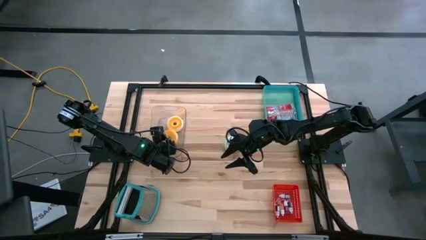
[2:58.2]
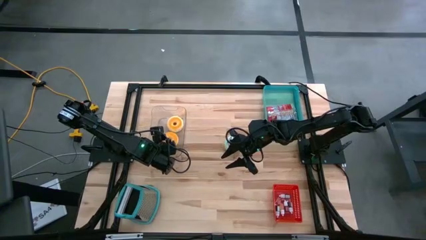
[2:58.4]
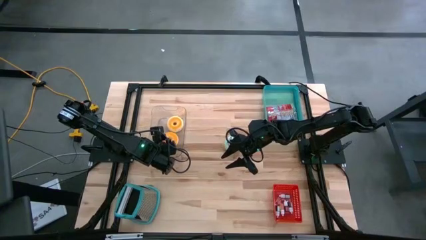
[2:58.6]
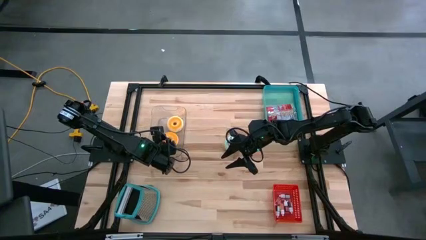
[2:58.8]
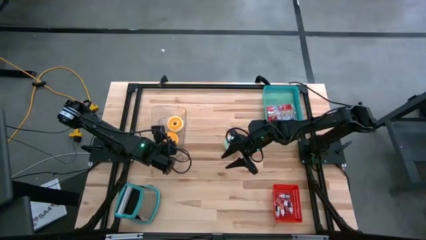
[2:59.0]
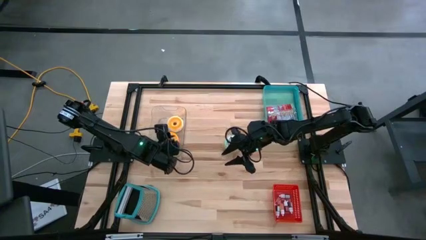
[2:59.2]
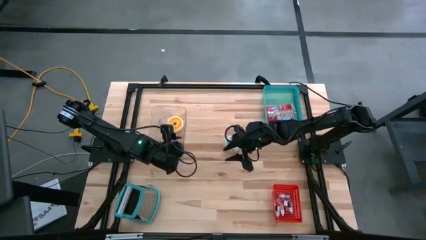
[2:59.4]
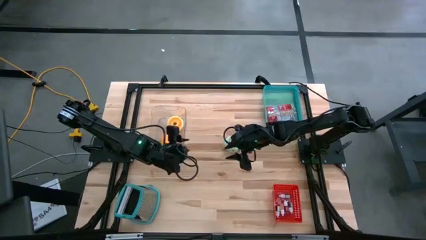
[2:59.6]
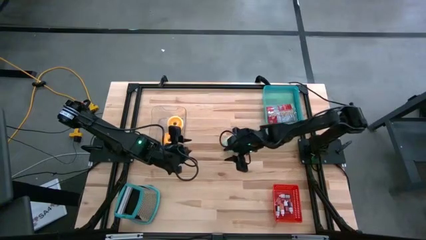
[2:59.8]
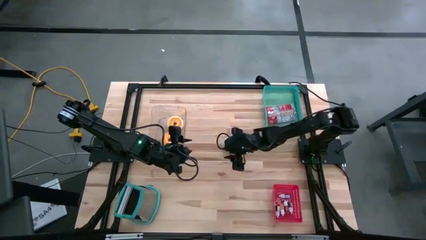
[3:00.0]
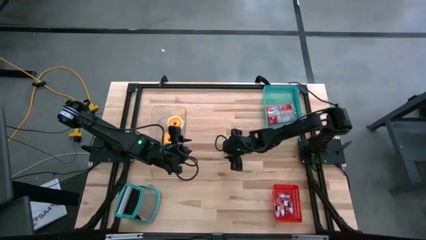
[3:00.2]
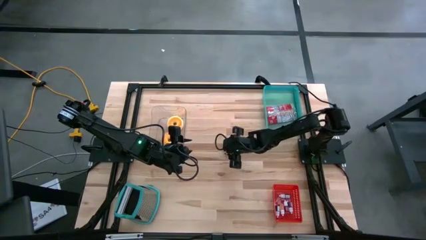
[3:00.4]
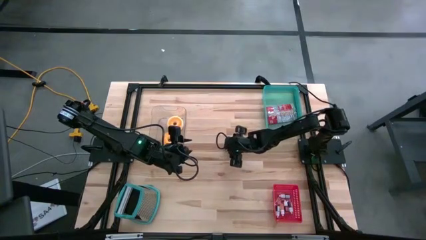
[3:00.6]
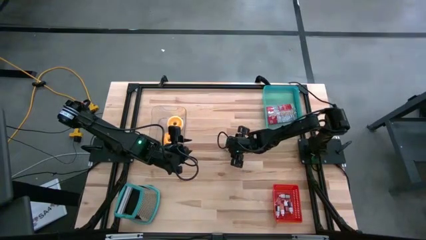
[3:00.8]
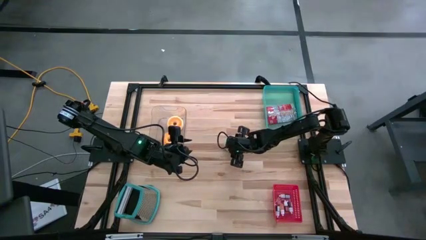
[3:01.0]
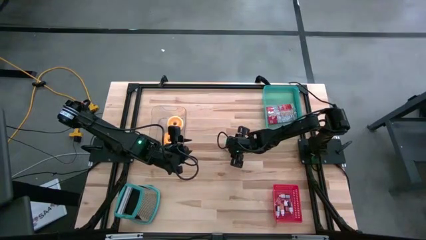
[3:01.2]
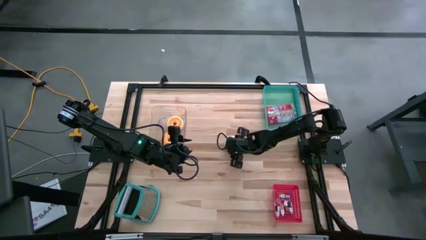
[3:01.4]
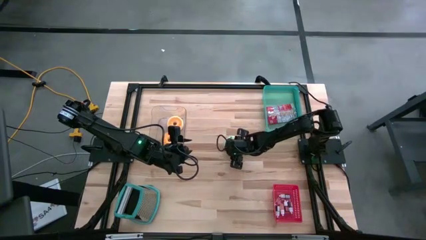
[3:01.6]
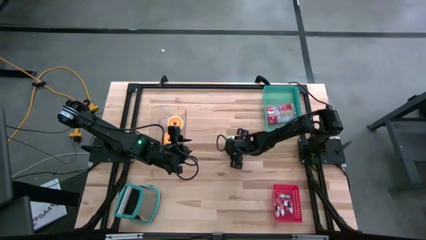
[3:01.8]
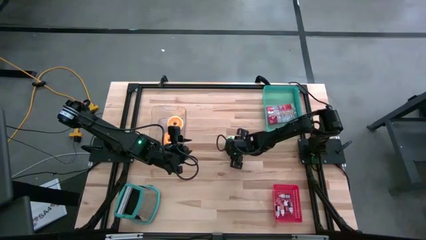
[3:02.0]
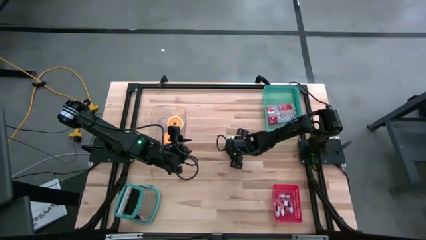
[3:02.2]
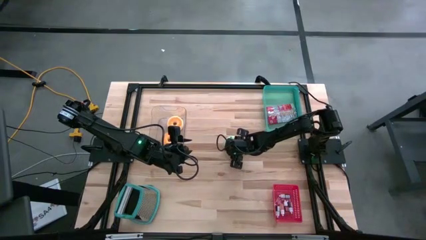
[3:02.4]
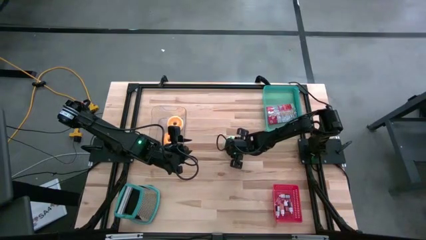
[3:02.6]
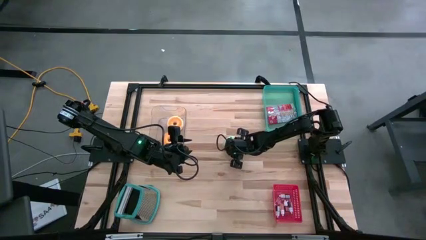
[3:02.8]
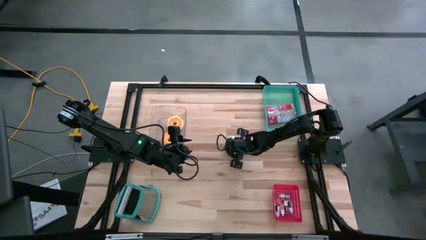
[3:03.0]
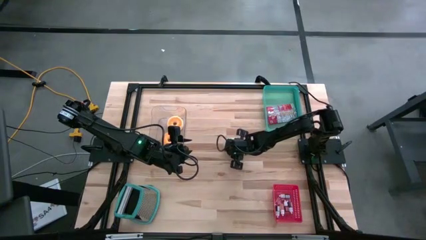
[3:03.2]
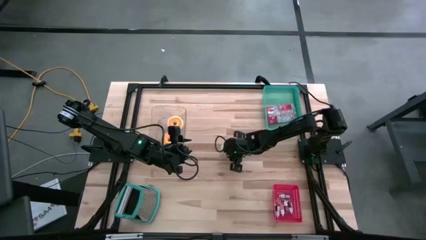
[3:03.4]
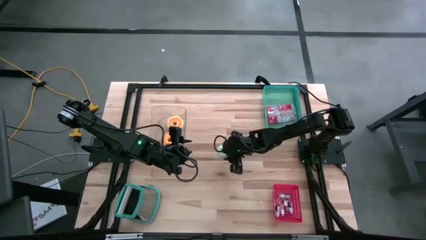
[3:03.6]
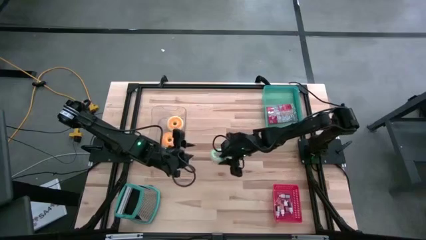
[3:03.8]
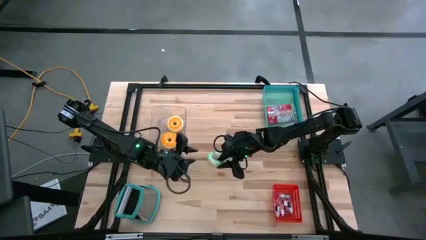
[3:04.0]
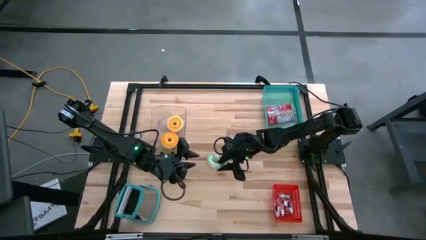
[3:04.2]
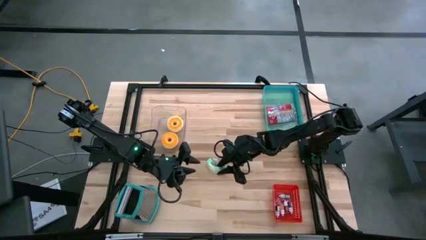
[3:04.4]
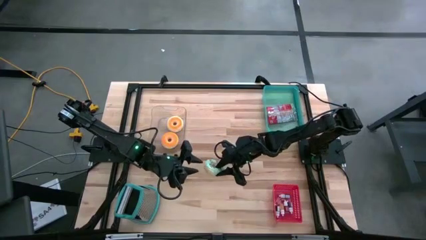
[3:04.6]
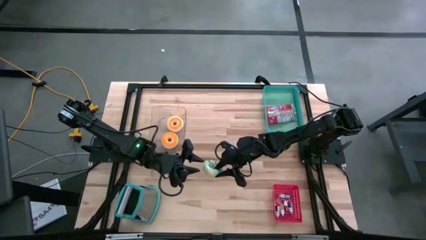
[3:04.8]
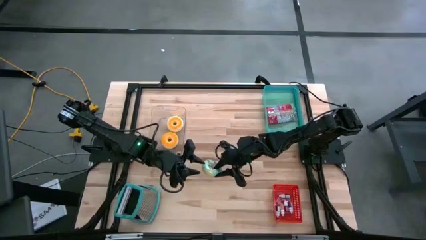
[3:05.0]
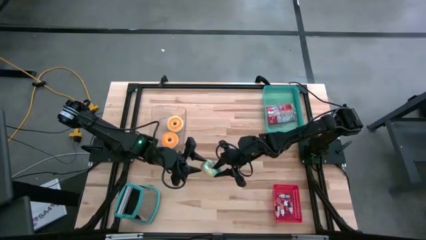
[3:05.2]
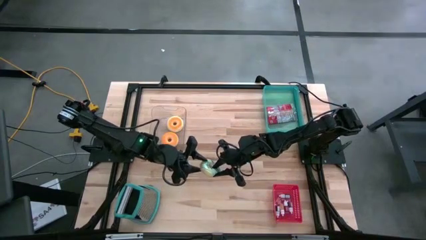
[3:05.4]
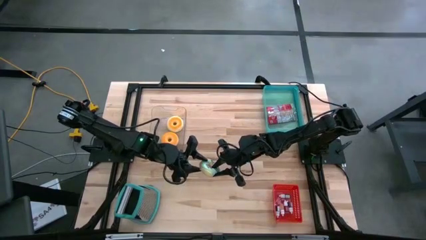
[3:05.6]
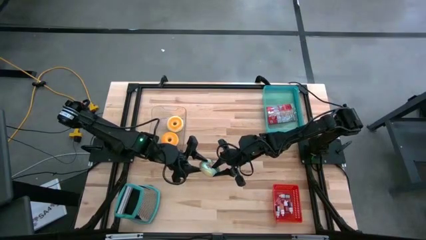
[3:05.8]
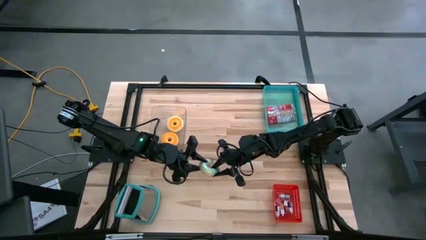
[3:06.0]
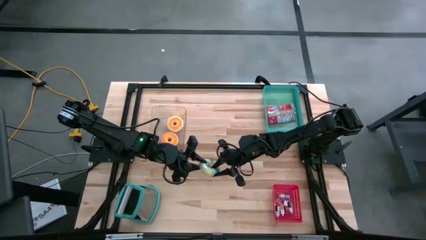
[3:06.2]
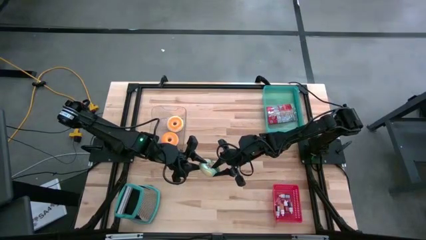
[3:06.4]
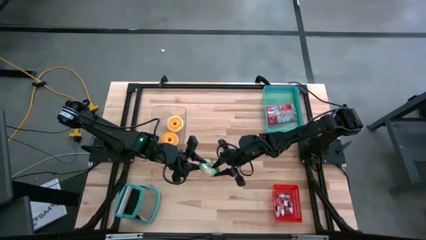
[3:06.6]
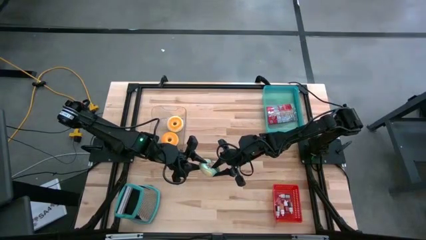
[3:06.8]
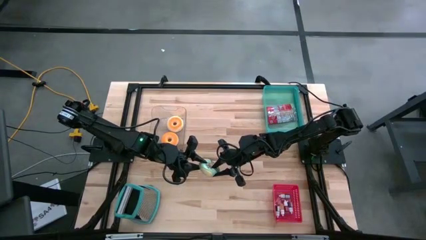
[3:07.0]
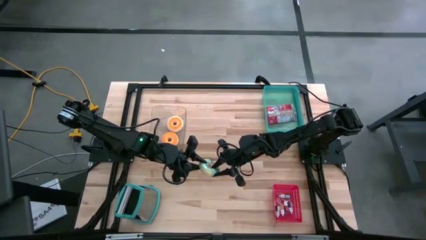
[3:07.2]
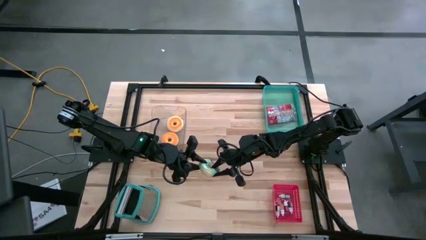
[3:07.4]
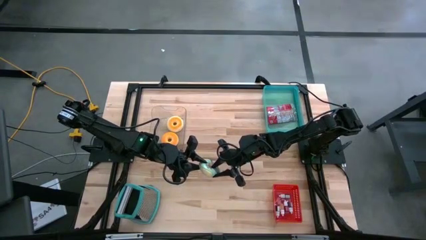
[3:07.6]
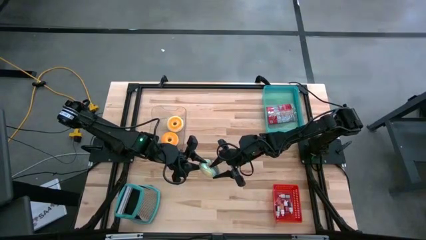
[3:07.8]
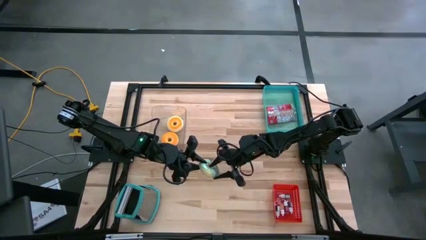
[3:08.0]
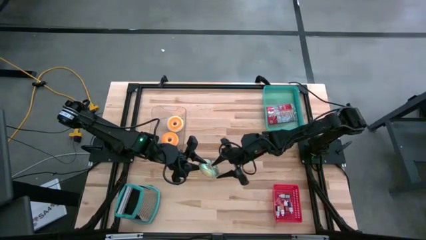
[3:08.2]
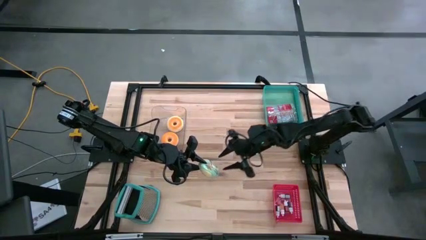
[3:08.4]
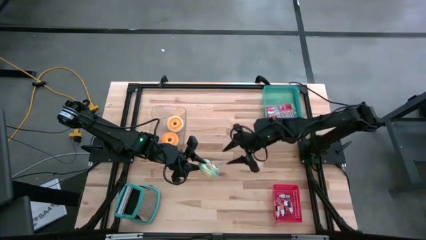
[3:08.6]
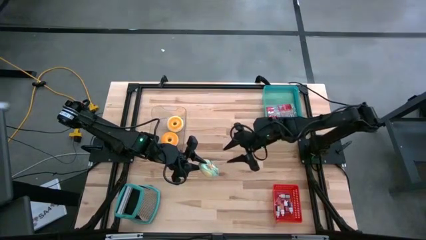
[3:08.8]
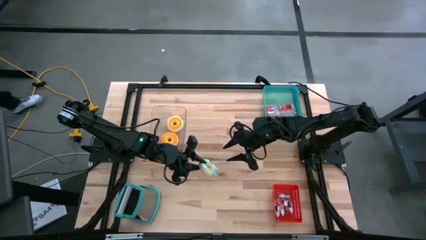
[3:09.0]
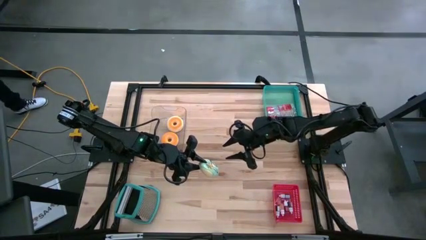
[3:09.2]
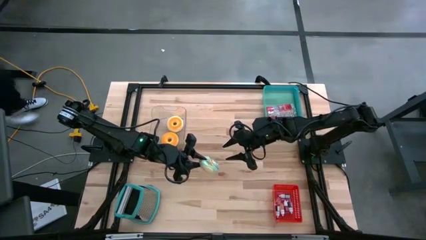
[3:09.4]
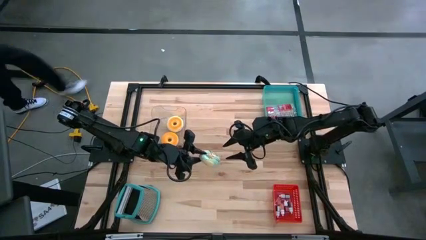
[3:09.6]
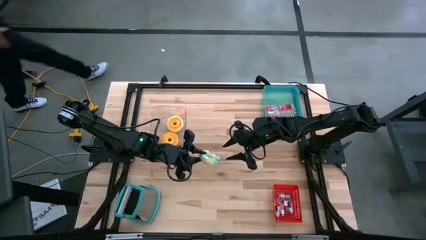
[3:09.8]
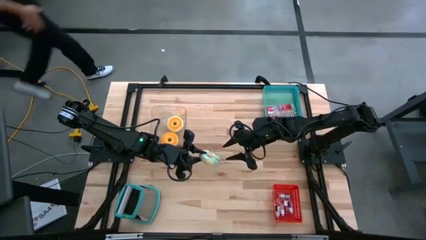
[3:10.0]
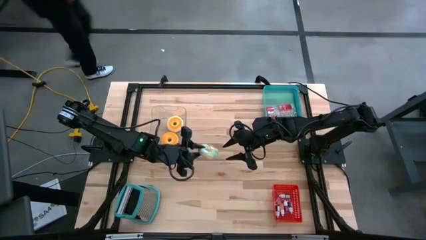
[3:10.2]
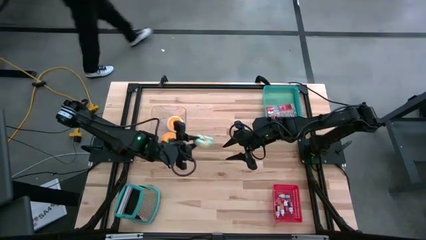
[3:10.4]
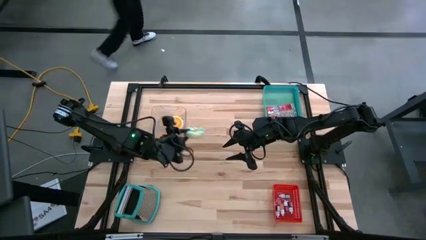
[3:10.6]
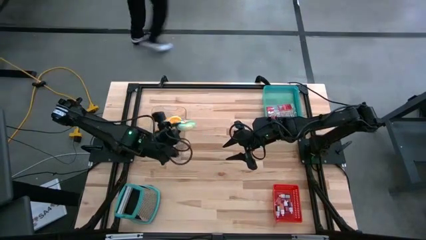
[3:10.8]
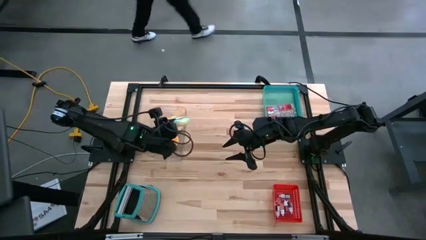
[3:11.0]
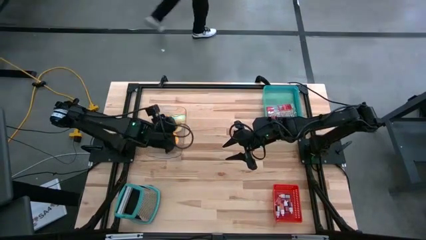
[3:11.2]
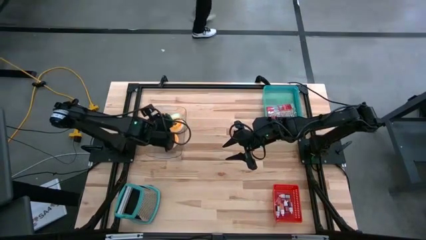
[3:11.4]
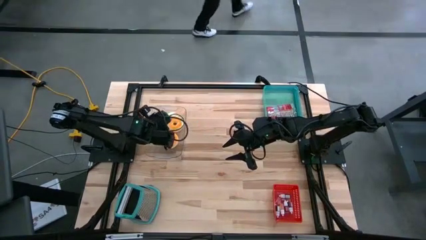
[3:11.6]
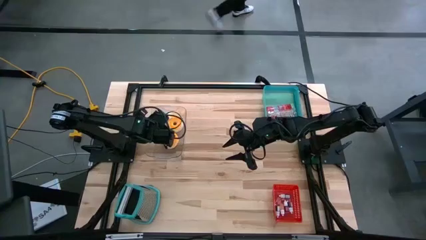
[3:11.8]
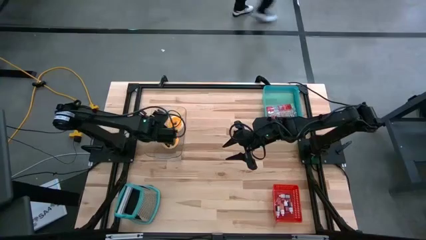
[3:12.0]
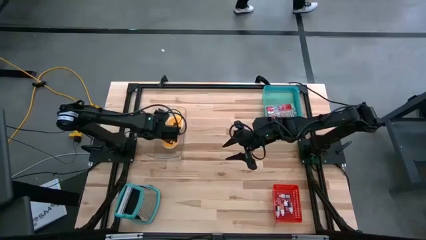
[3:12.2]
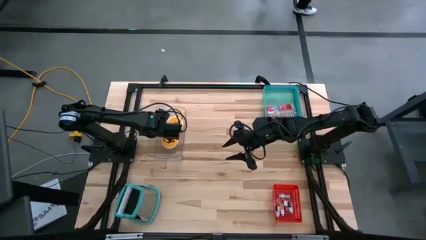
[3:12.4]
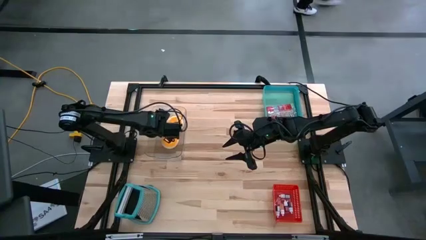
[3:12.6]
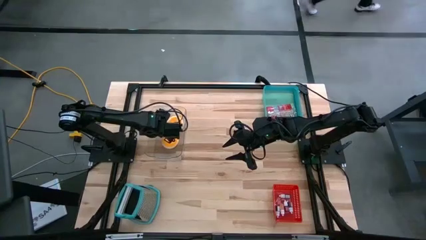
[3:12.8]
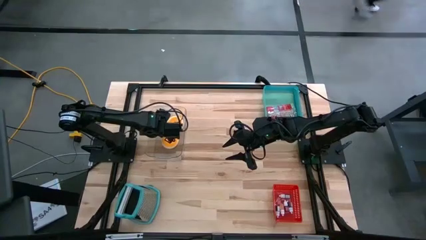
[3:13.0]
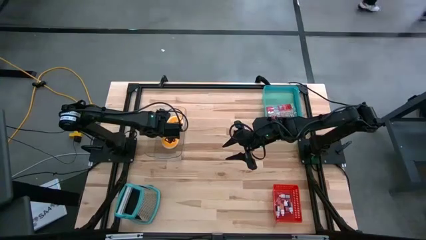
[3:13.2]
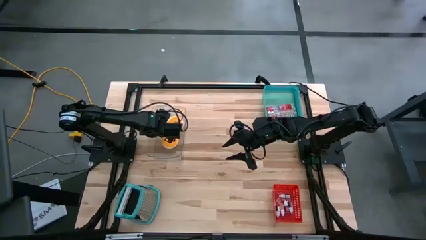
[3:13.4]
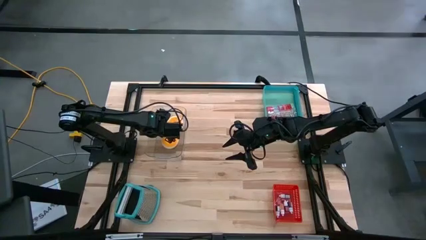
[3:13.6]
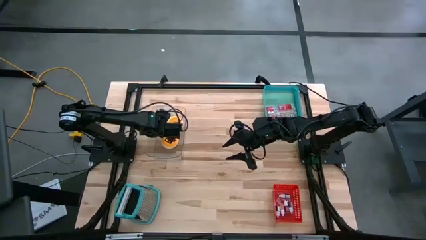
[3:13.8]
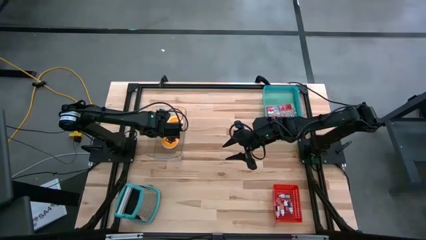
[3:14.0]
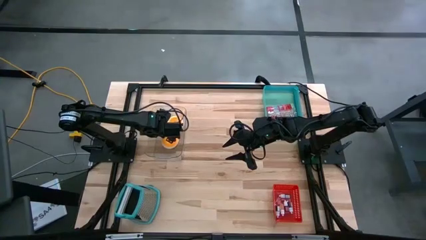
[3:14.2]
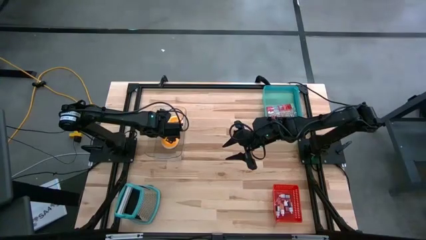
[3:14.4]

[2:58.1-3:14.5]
Put the light blue doughnut into the transparent bin
